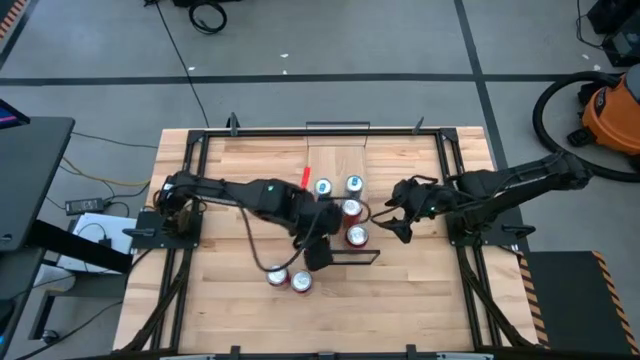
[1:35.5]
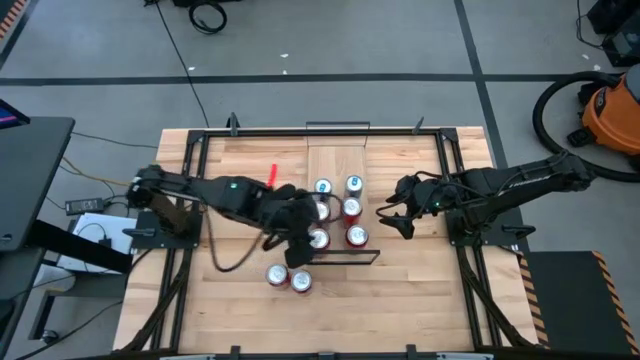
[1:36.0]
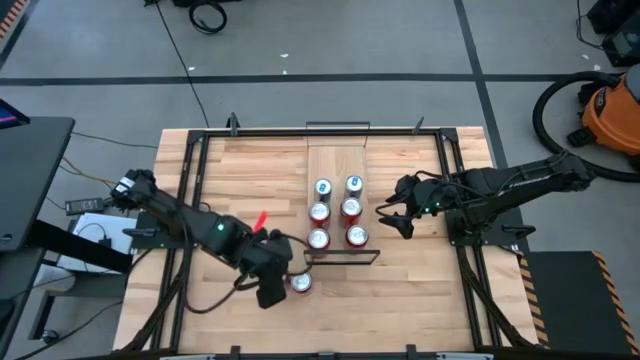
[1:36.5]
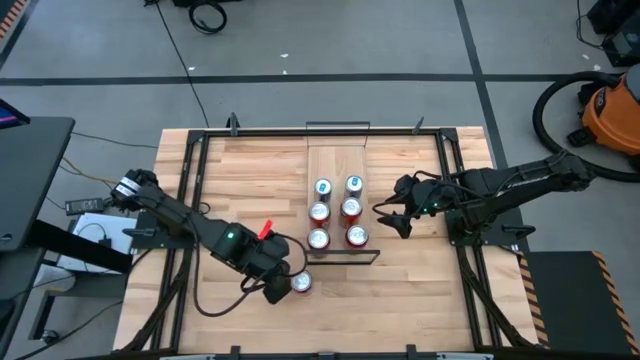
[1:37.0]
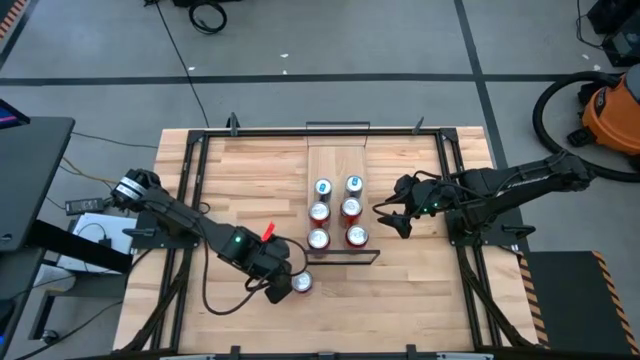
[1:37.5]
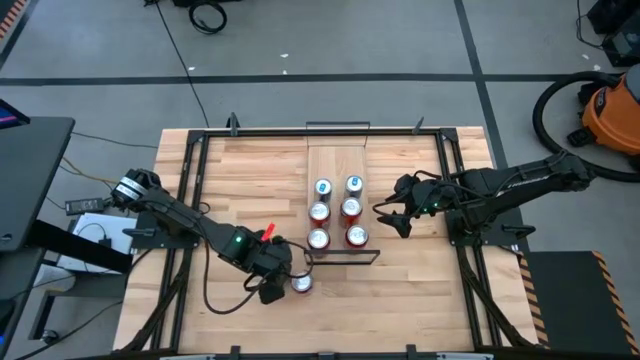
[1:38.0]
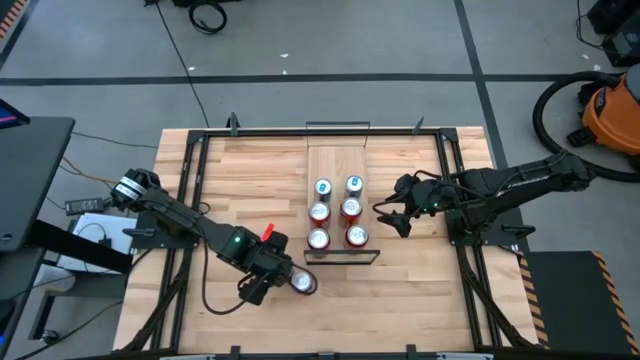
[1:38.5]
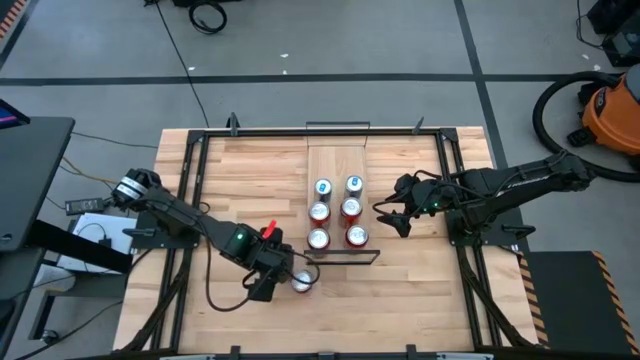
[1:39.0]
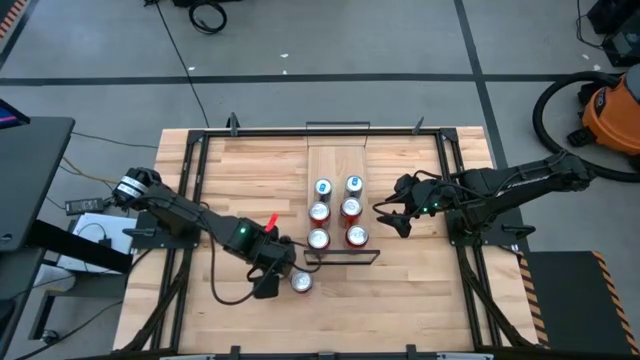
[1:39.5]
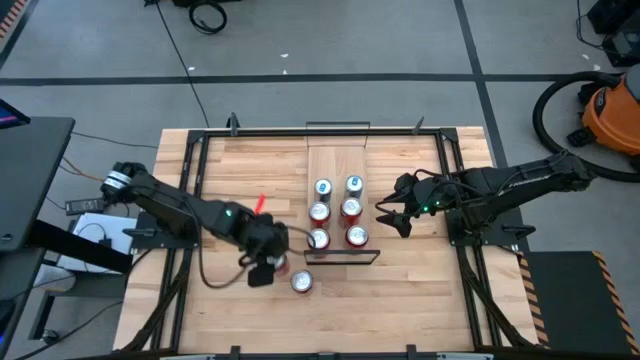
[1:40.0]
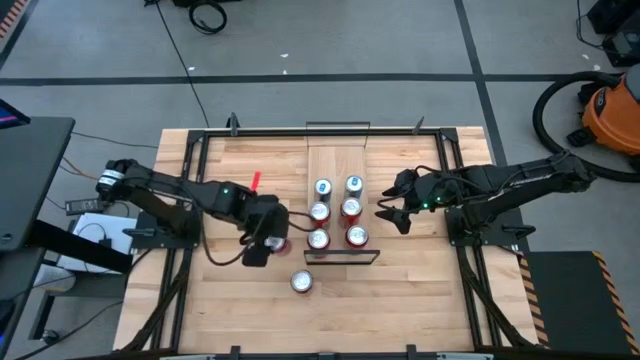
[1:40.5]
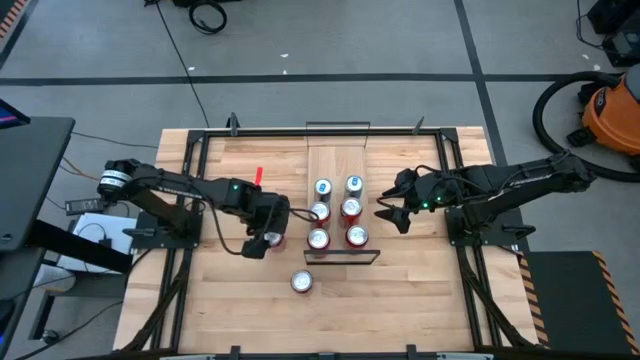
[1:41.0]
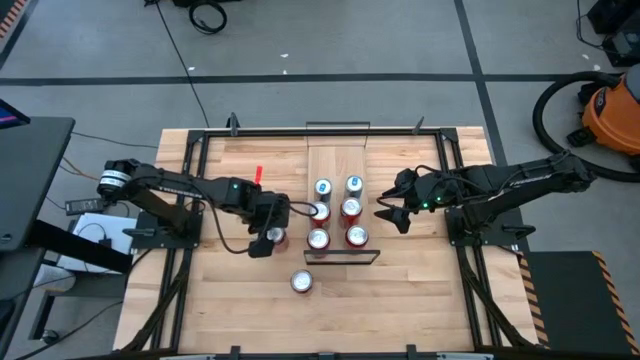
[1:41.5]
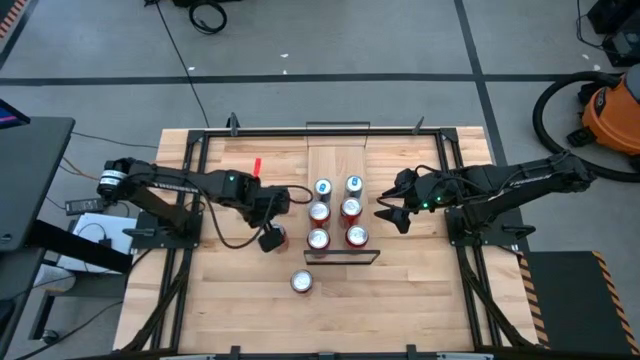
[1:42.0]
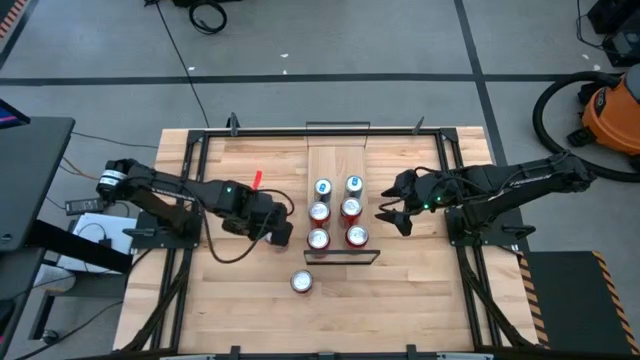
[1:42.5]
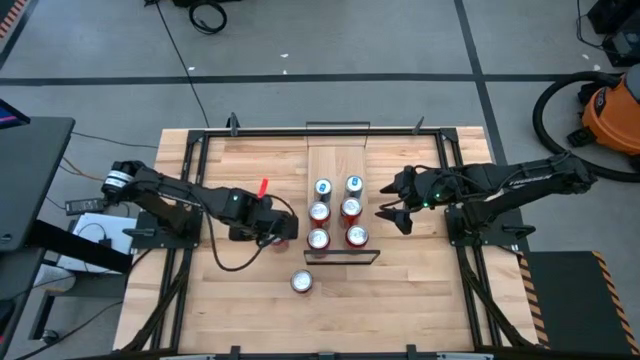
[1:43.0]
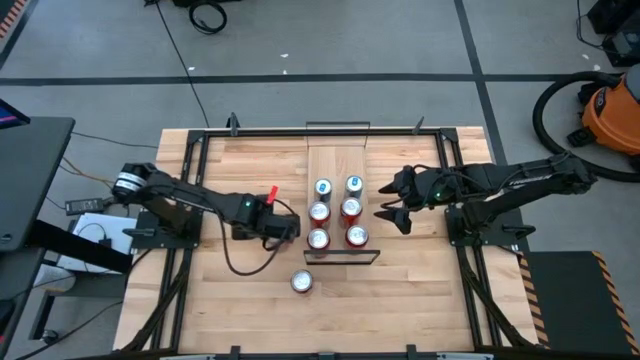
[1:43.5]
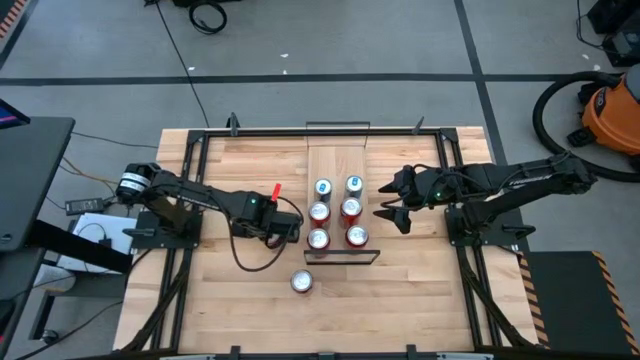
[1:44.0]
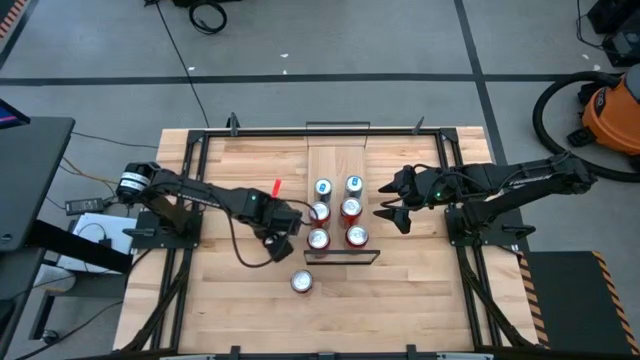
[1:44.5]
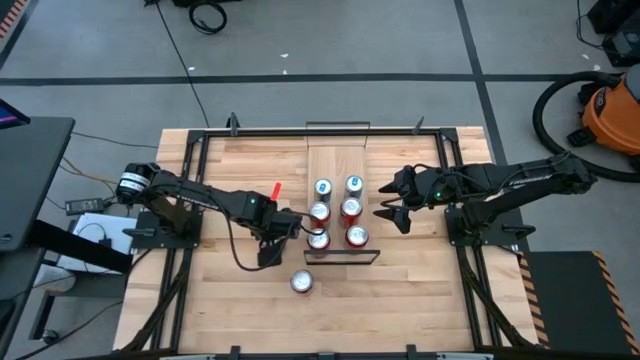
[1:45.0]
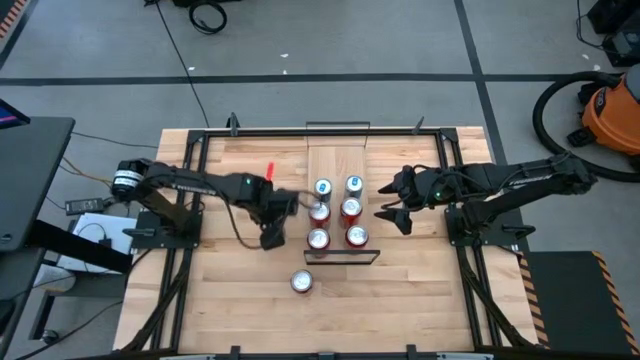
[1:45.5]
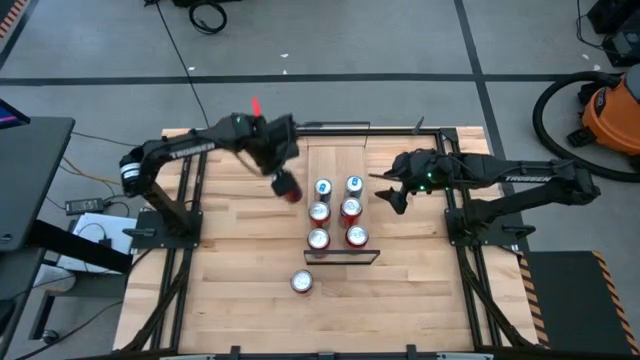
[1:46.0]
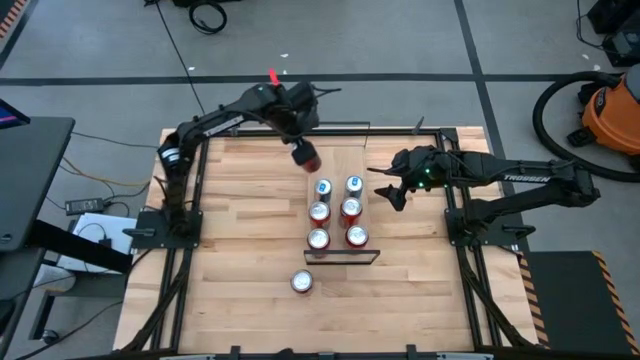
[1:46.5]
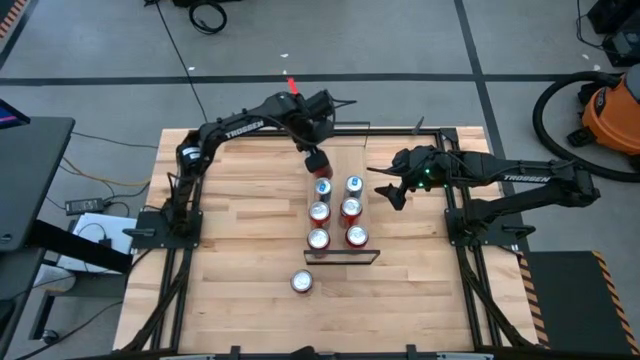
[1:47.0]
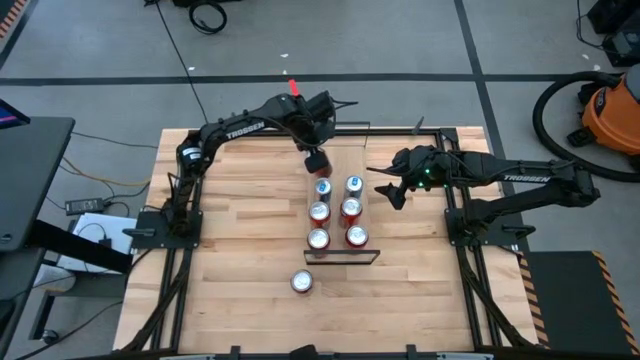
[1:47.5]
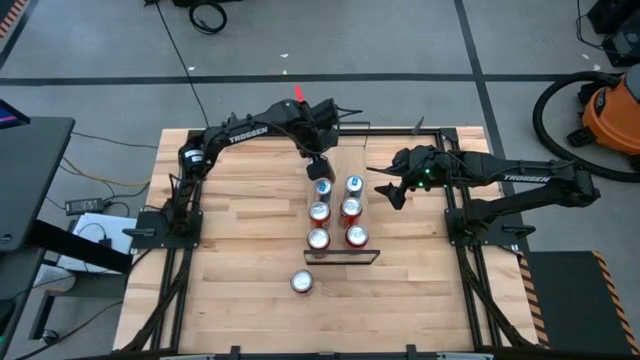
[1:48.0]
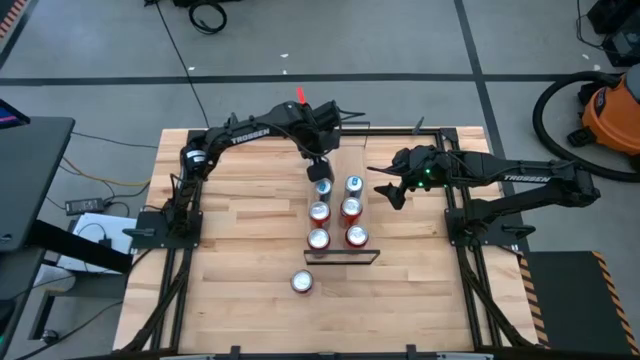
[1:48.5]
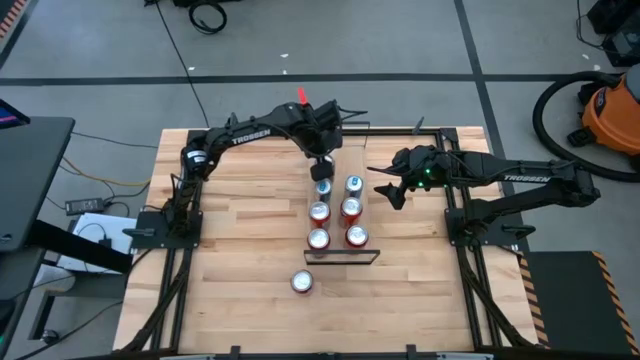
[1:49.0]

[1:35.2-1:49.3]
Task: Place canned beverage on shelf
Put the left red white soda can on the shelf

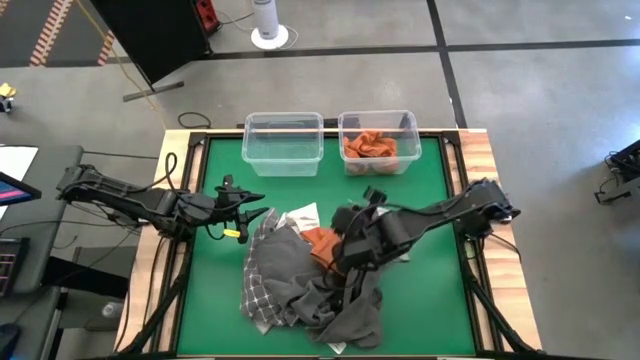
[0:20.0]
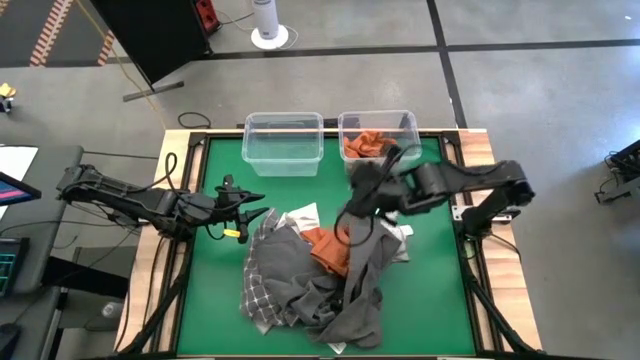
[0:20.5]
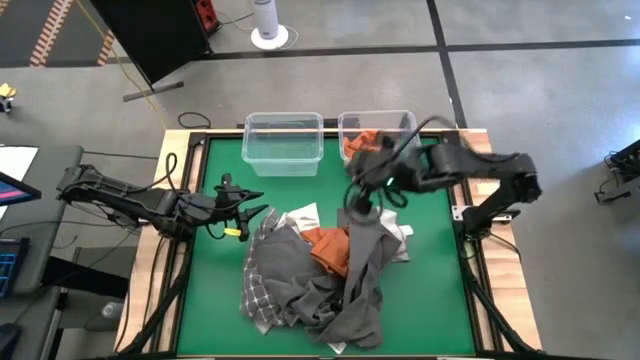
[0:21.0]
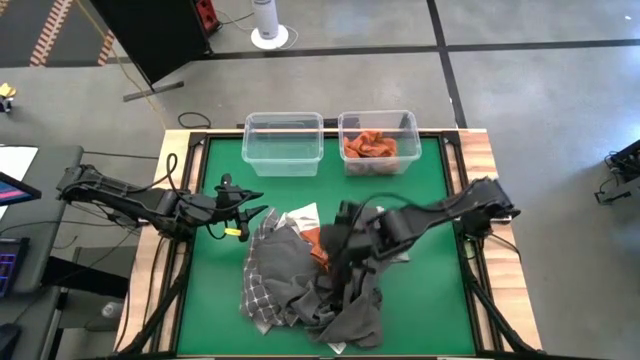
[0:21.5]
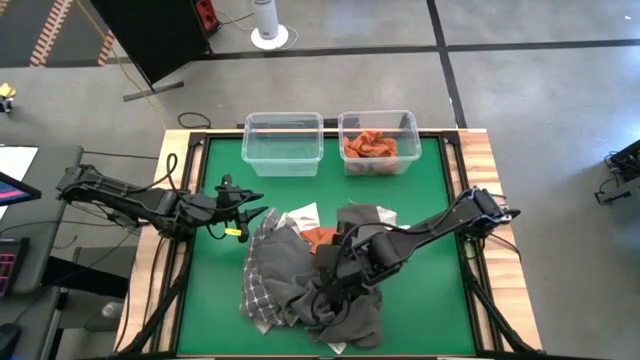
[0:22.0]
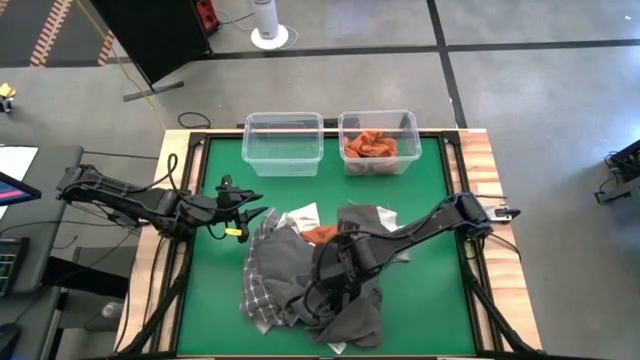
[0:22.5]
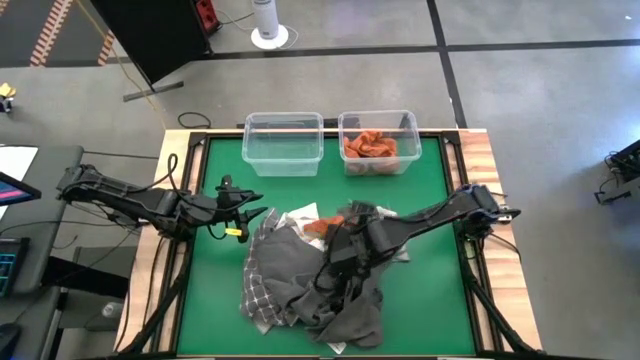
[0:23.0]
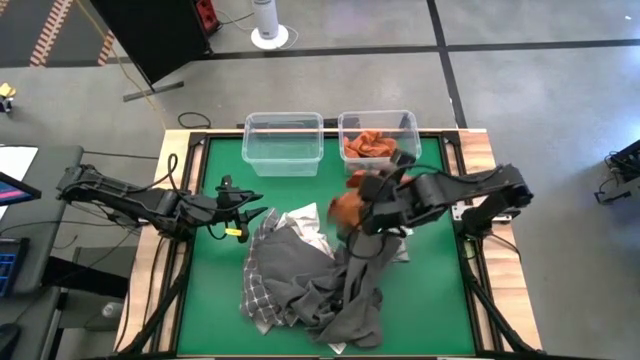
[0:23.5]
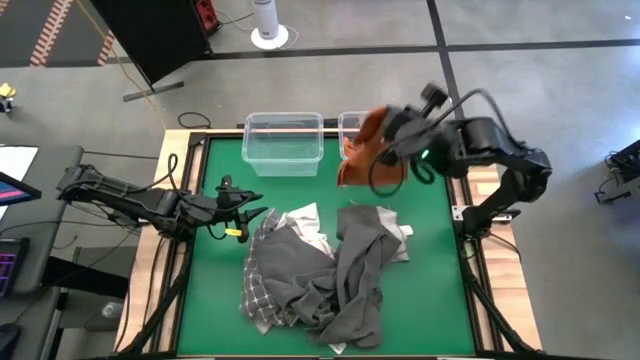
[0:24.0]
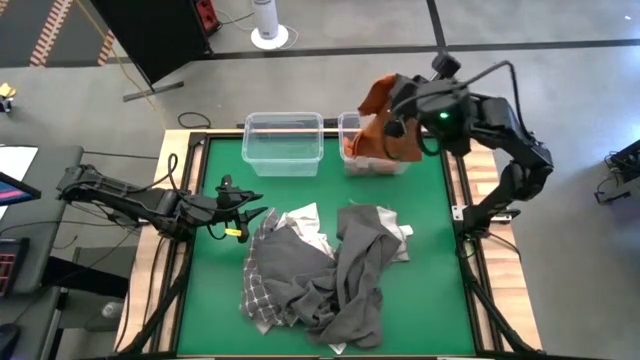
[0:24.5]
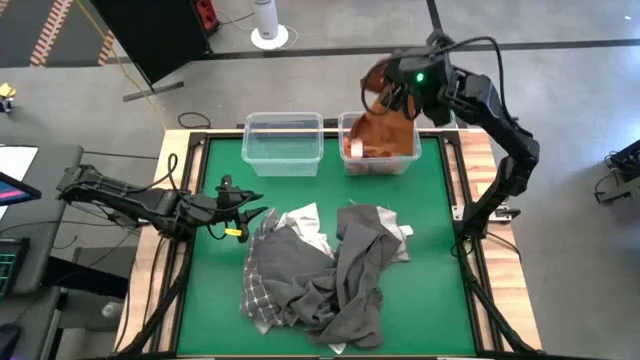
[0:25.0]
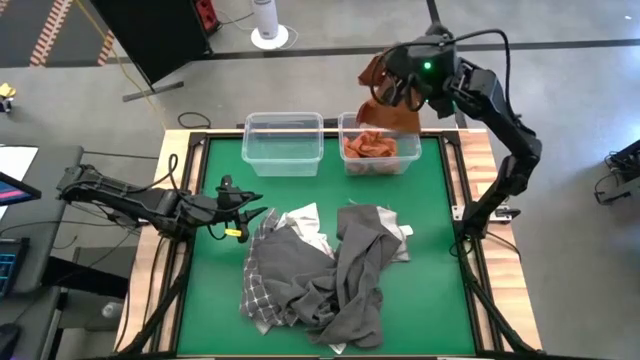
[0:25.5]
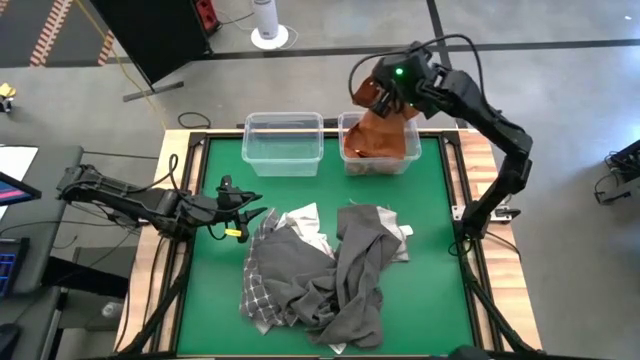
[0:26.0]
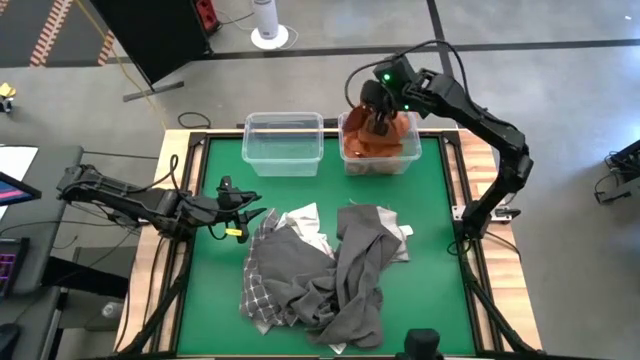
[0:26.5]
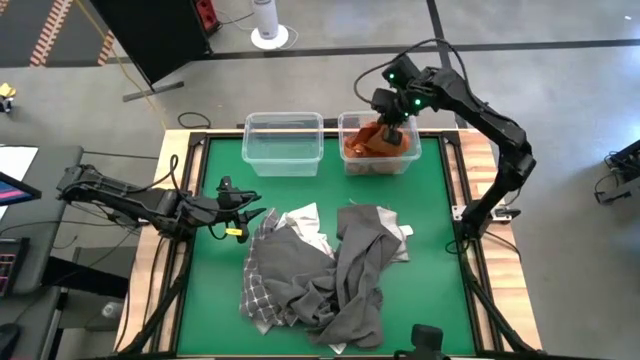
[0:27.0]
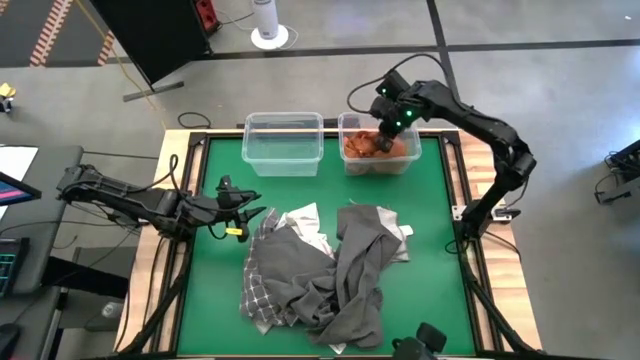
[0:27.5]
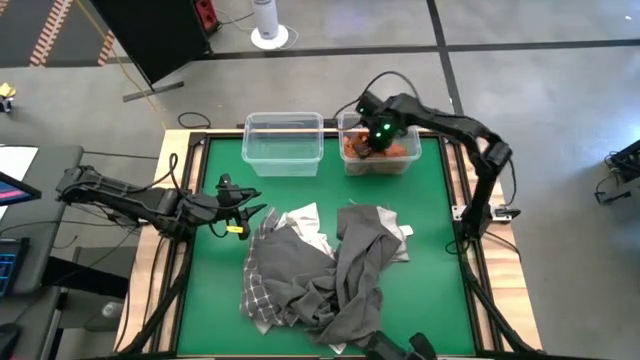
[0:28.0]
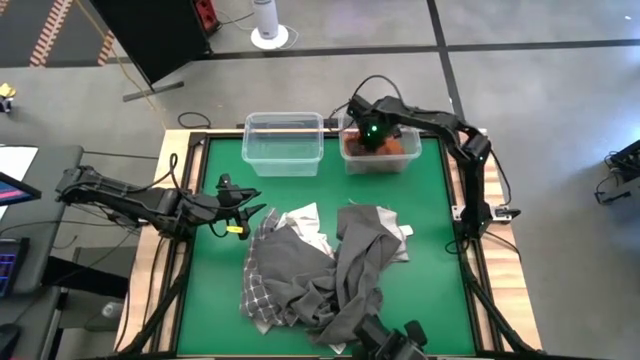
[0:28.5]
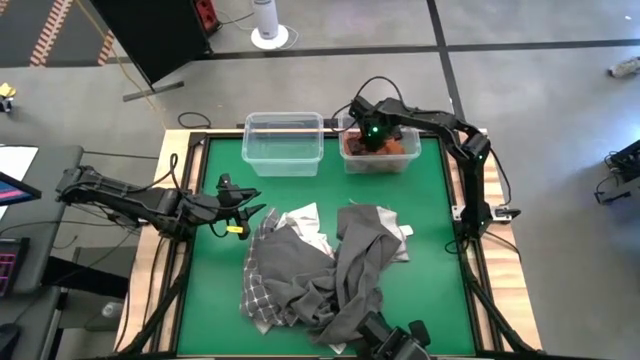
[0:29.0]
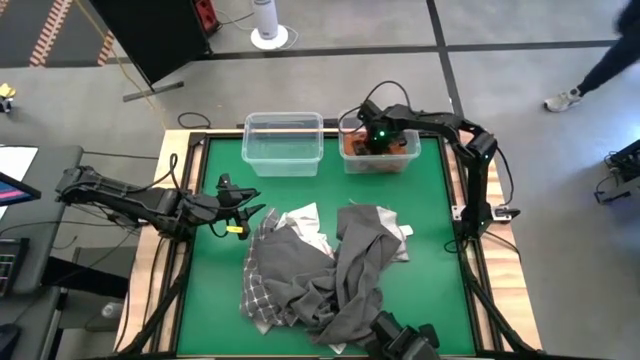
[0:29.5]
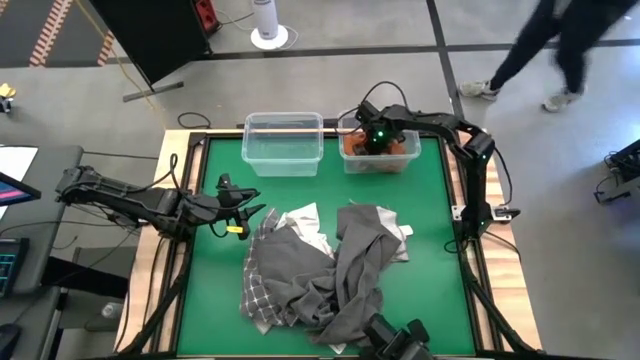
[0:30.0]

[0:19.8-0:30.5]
Task: Sort towels by color in basket
Put the orange microfiber towel into the right transparent bin
